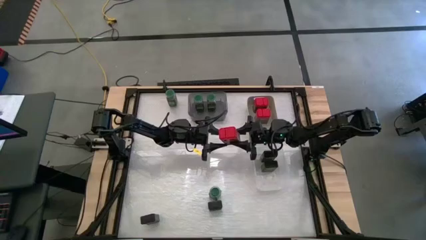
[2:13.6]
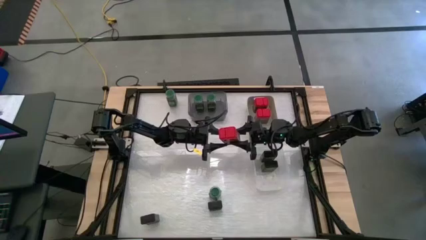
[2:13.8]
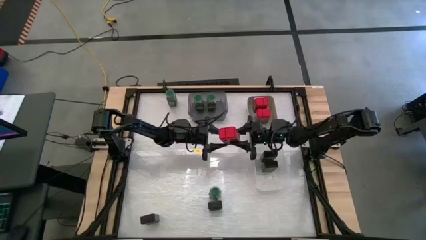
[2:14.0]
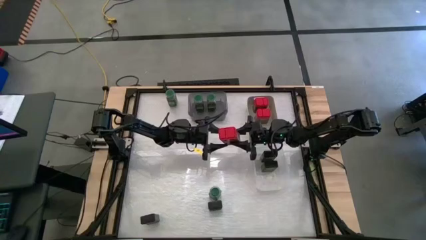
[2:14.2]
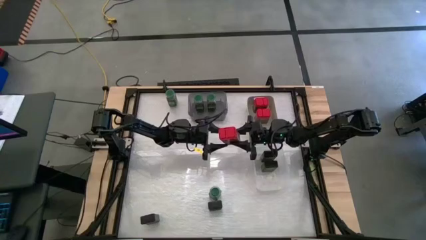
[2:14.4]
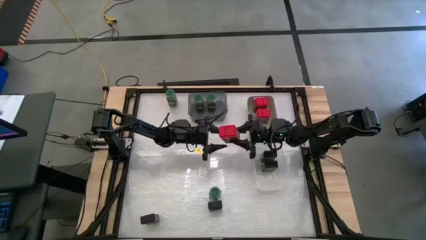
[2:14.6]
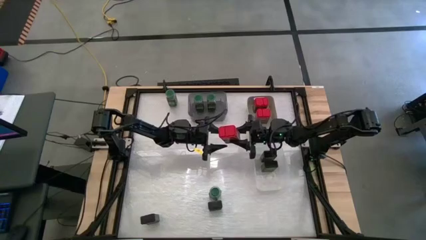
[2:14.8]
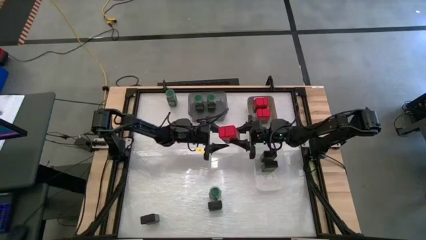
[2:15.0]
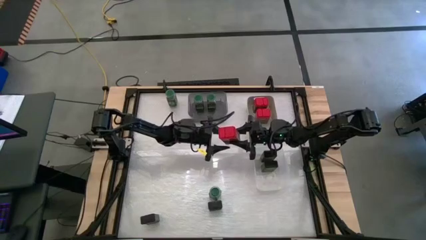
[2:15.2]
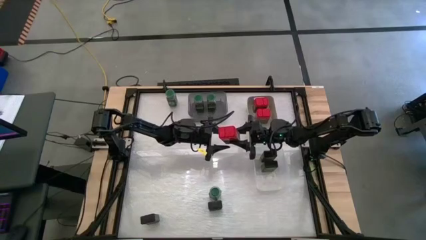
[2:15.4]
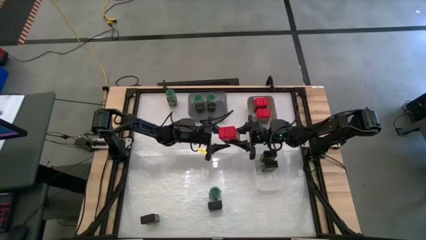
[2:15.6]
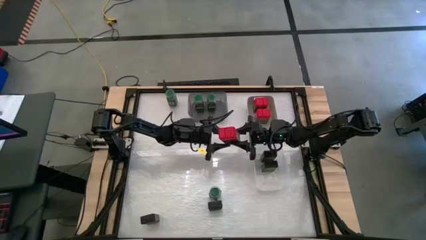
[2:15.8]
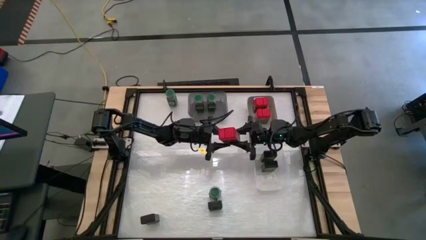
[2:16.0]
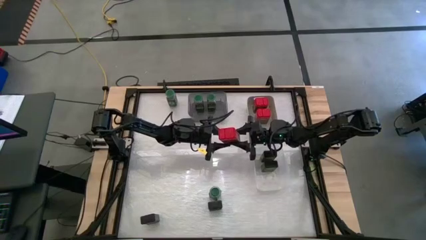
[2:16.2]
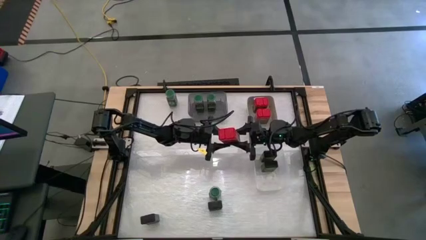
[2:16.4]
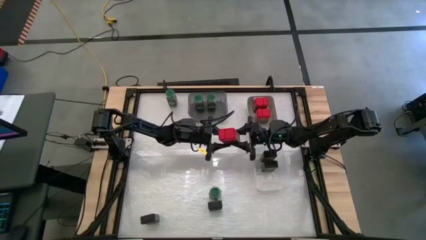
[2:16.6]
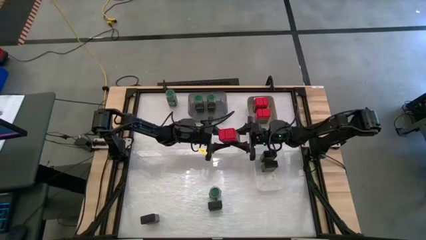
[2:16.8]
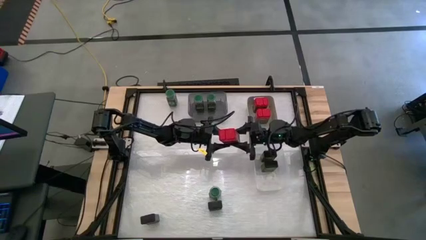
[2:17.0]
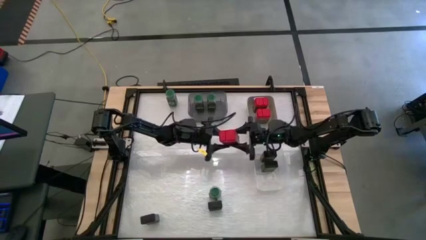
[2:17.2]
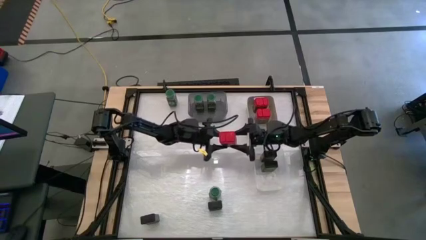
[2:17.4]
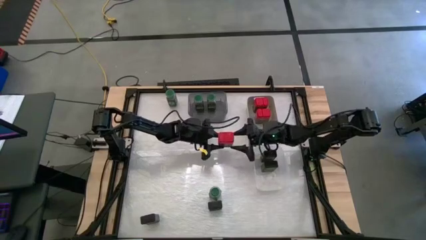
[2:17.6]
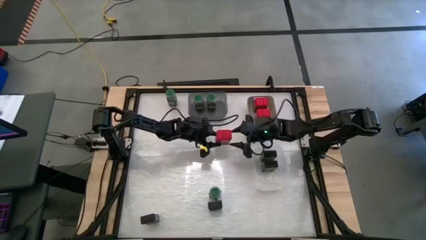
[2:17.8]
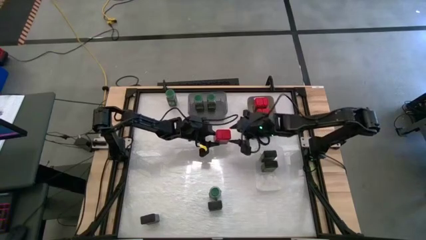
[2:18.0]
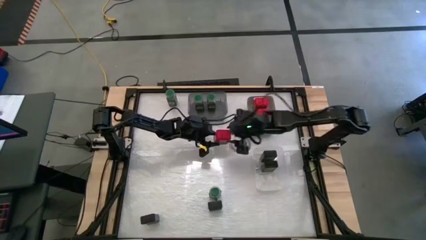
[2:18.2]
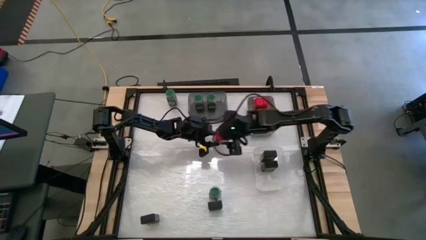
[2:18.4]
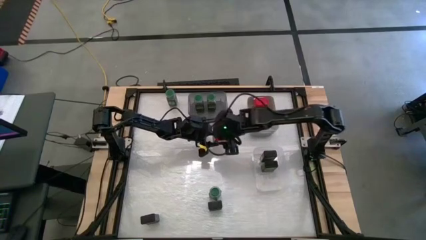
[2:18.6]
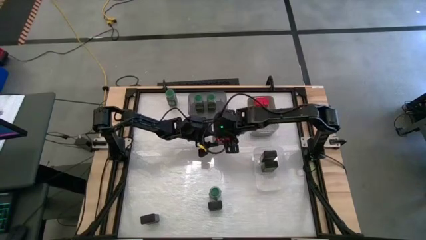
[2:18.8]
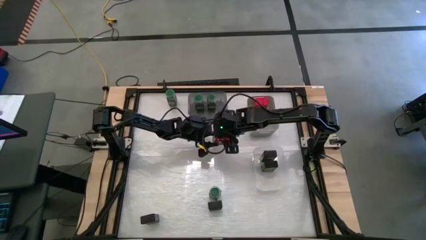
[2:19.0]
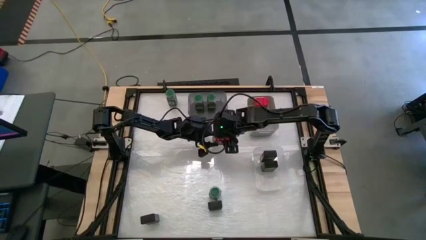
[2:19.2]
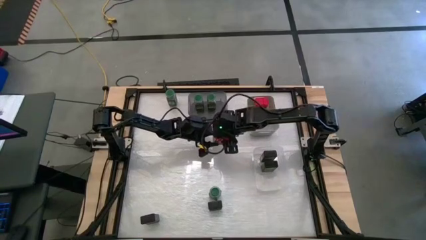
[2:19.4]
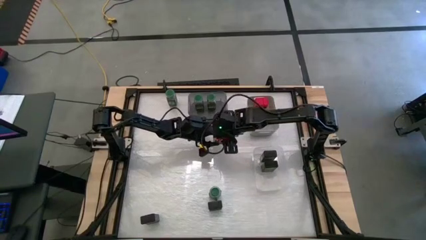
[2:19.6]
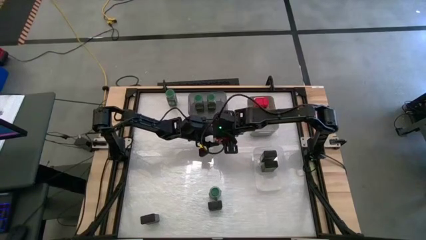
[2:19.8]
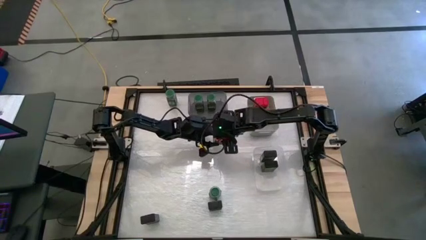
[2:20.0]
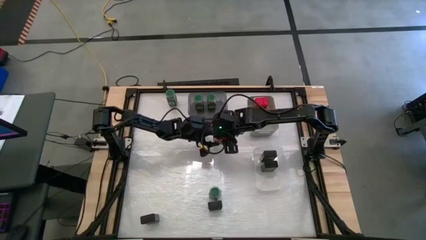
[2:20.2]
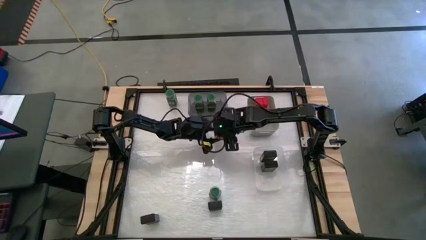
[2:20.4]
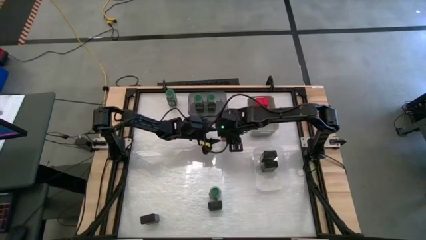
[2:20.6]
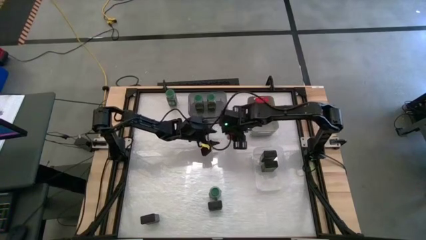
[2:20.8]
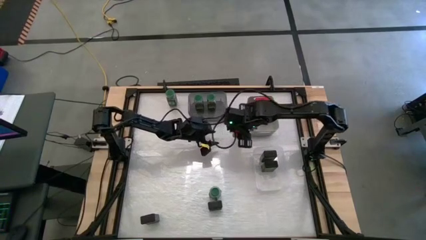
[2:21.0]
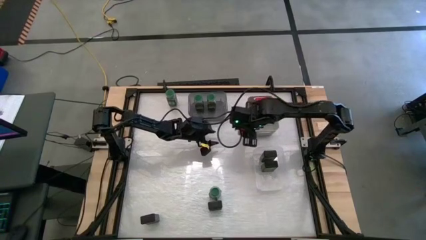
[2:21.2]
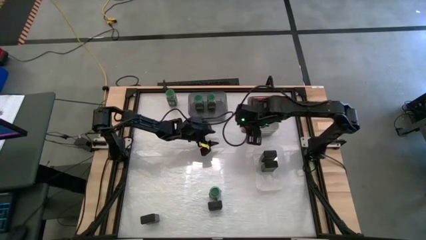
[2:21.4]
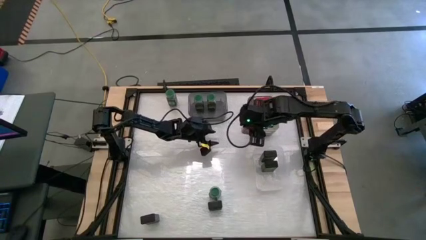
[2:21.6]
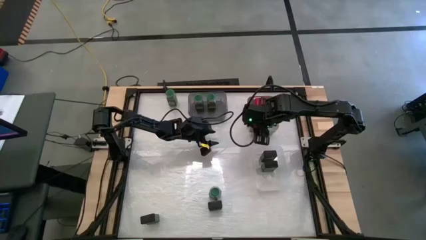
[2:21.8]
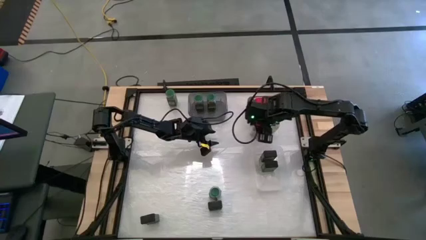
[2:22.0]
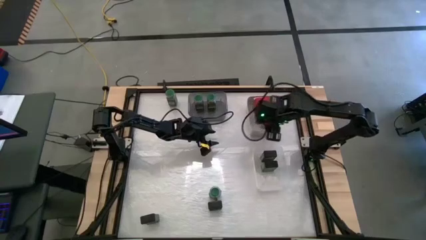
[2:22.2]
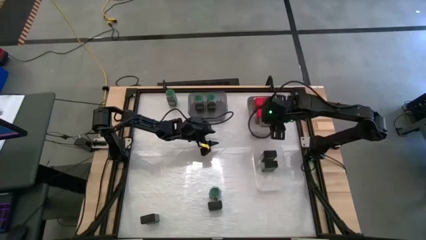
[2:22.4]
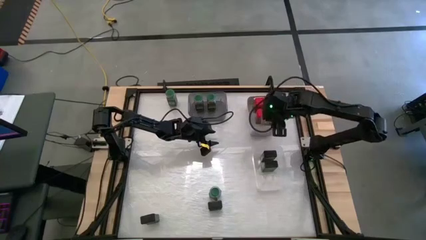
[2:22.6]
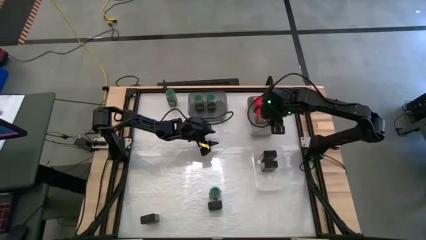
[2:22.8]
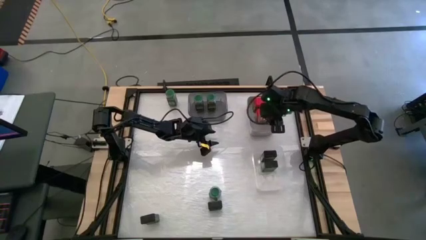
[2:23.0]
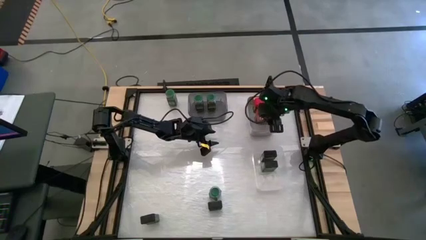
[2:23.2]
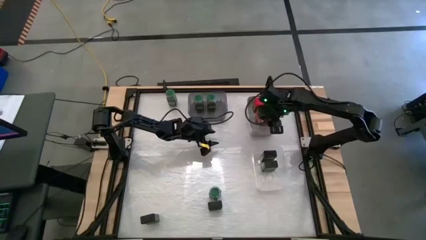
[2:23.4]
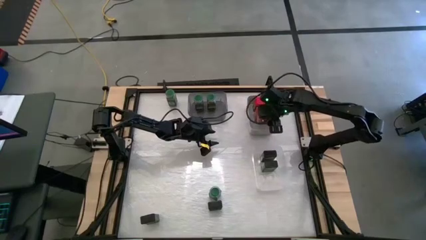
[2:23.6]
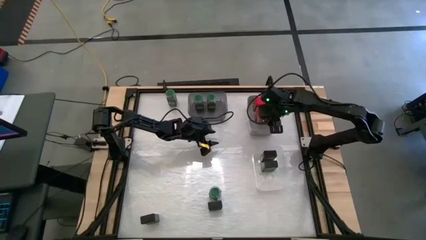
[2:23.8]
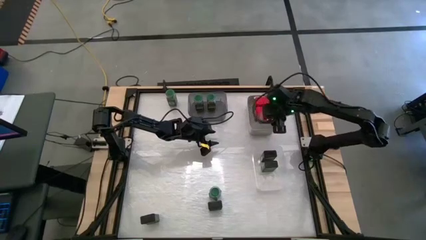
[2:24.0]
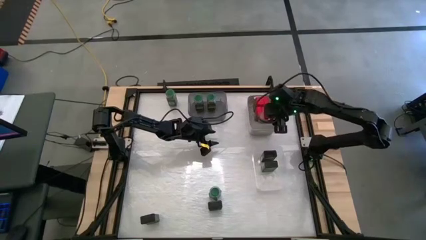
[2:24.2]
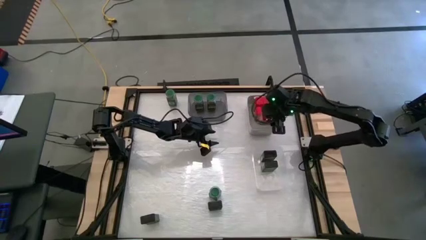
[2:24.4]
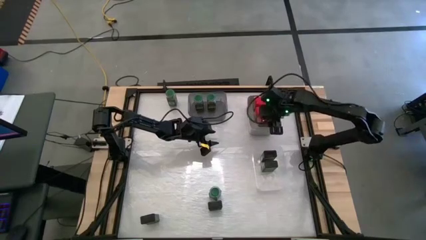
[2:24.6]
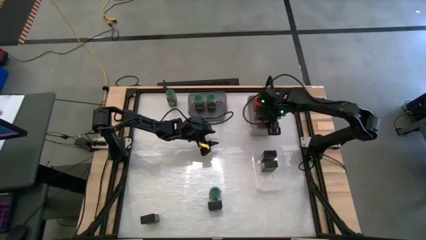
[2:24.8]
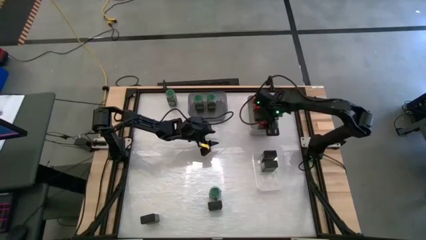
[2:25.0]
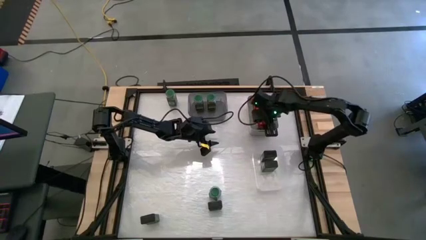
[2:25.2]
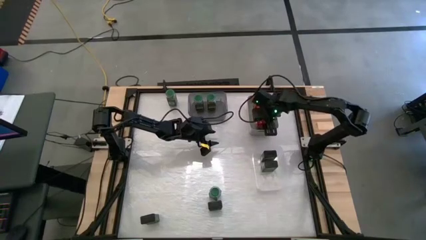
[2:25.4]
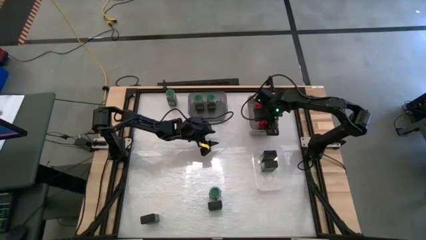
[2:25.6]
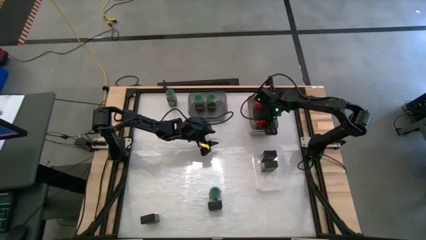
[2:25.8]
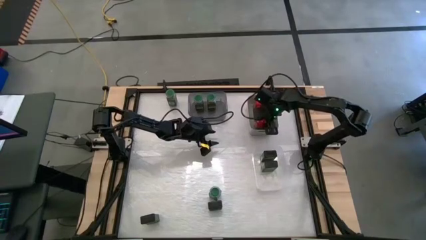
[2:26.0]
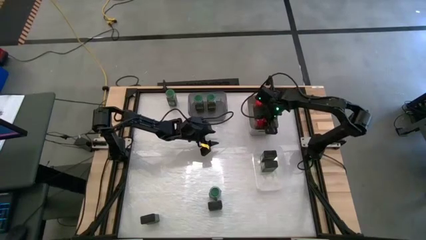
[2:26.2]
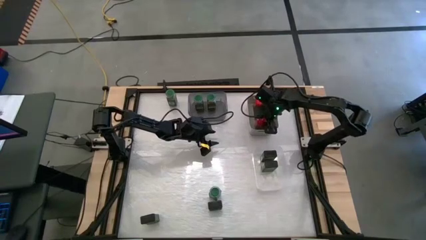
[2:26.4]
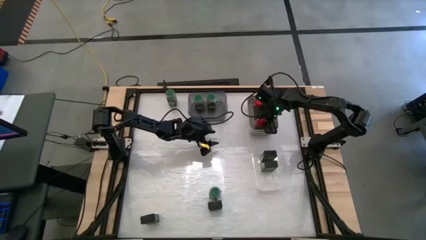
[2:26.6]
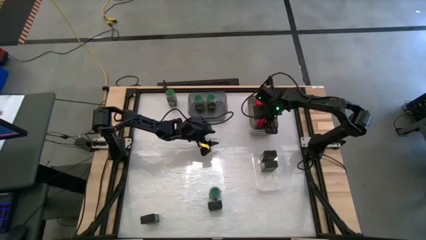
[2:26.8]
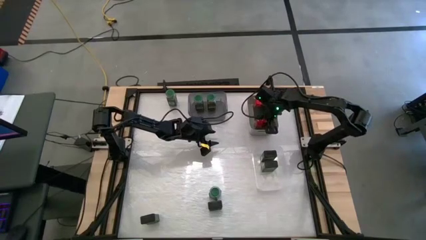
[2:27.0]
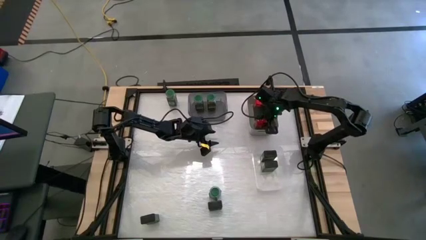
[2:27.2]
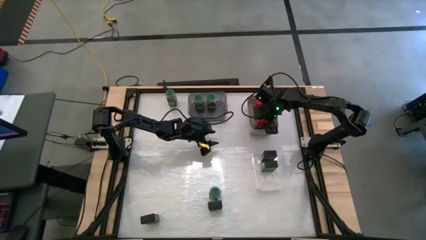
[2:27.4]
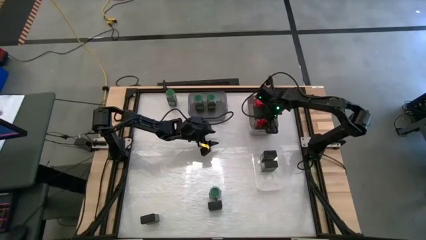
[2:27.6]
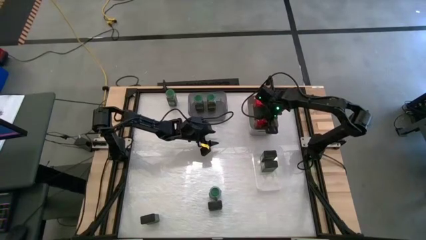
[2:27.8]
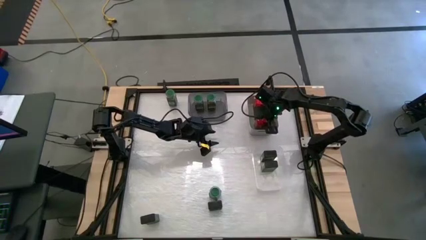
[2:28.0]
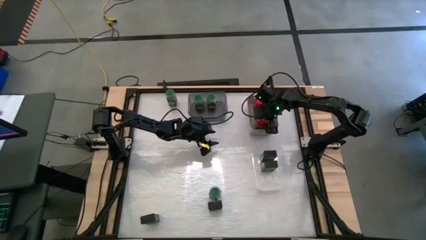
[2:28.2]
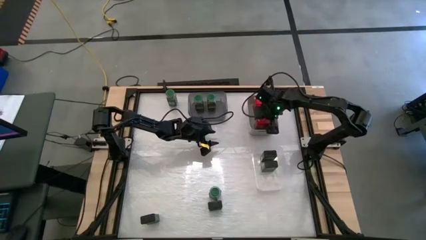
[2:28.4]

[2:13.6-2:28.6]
Task: Sort spices by type
Put the center red seasoning can into the gray bin
